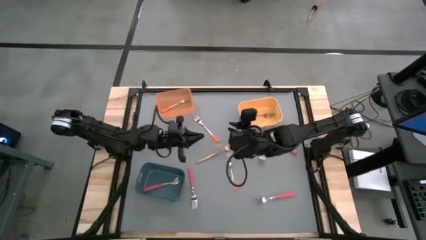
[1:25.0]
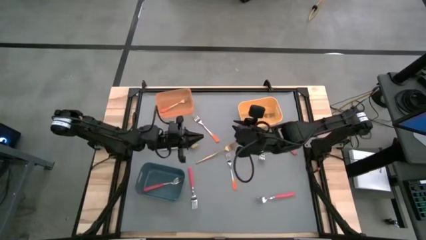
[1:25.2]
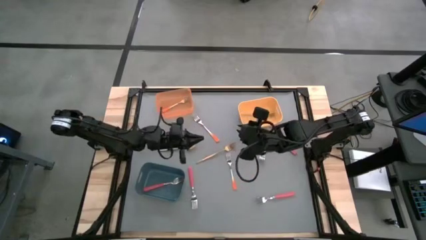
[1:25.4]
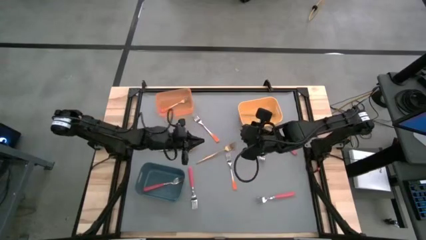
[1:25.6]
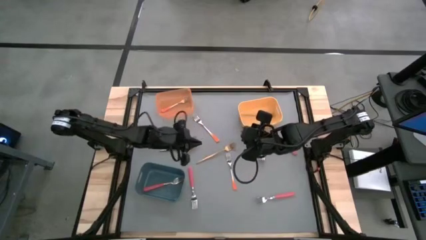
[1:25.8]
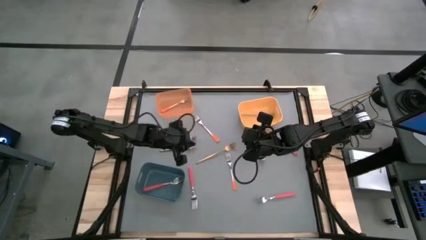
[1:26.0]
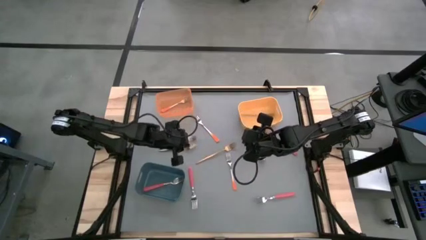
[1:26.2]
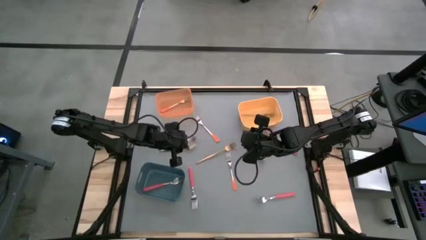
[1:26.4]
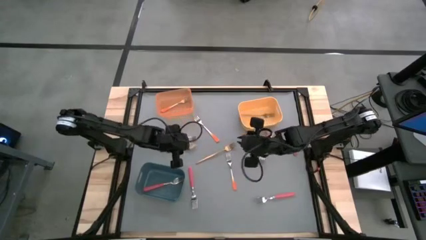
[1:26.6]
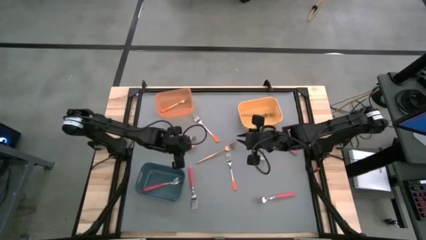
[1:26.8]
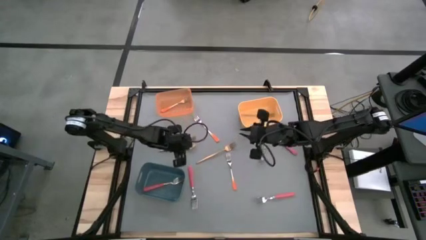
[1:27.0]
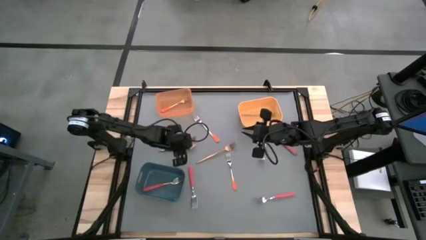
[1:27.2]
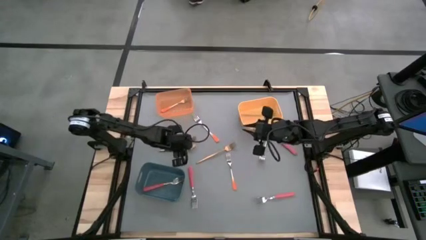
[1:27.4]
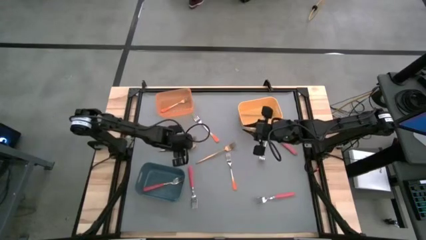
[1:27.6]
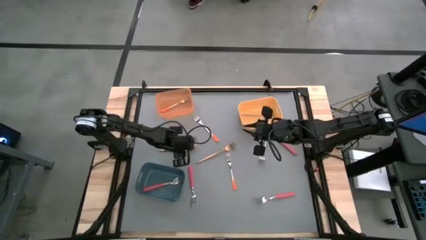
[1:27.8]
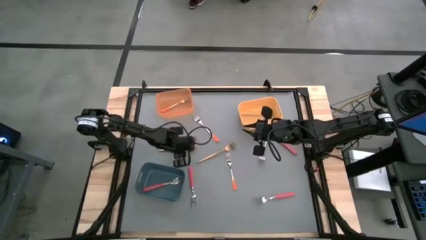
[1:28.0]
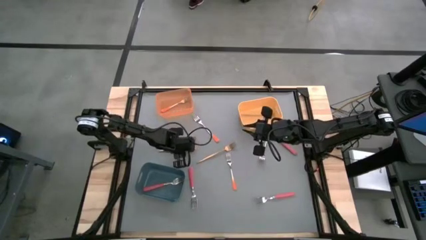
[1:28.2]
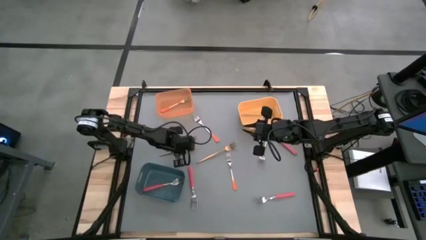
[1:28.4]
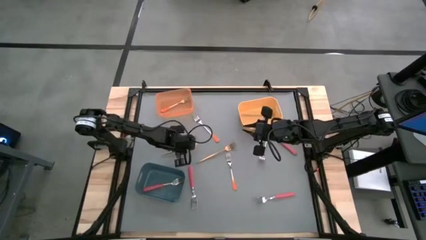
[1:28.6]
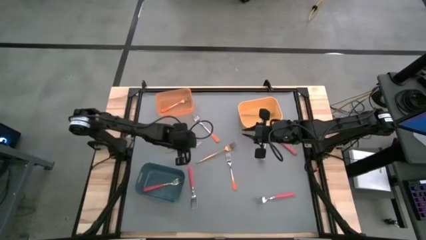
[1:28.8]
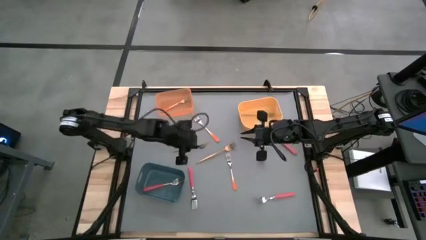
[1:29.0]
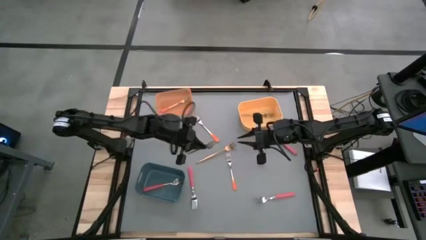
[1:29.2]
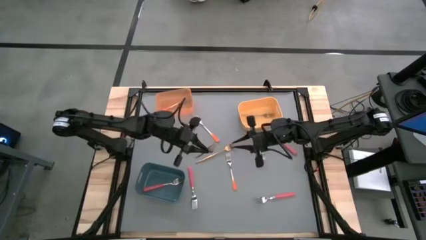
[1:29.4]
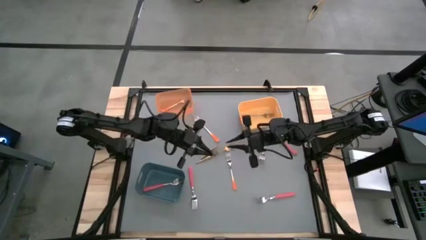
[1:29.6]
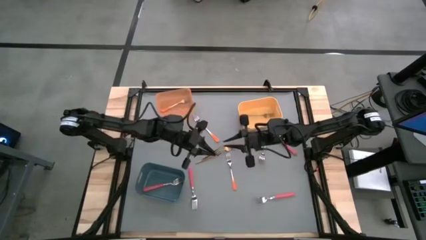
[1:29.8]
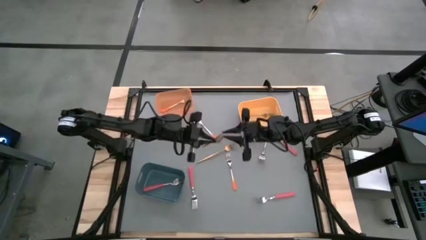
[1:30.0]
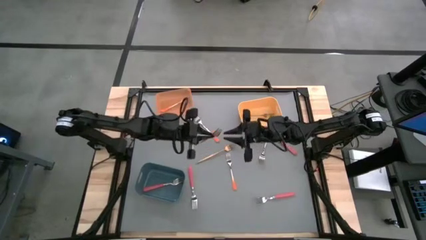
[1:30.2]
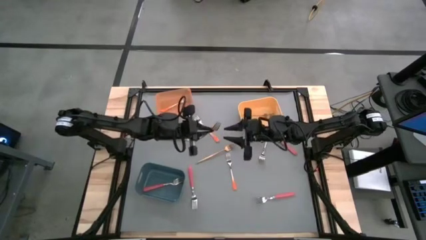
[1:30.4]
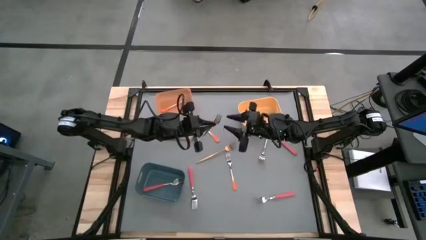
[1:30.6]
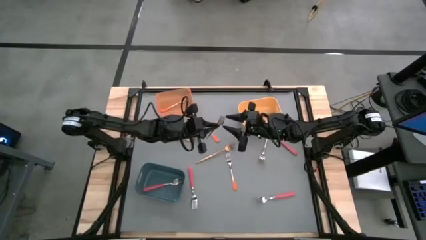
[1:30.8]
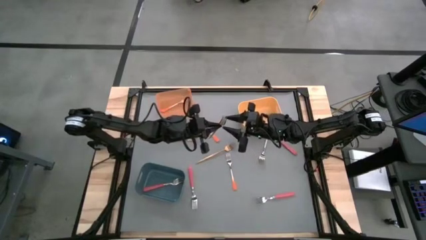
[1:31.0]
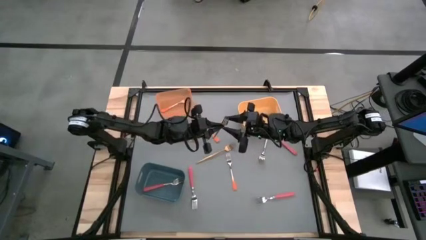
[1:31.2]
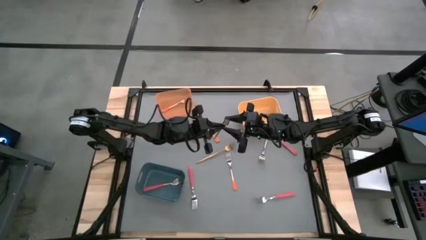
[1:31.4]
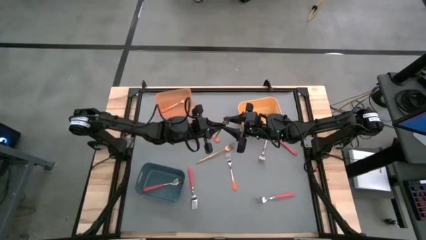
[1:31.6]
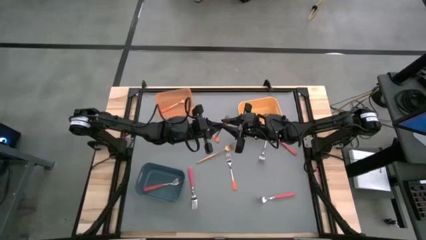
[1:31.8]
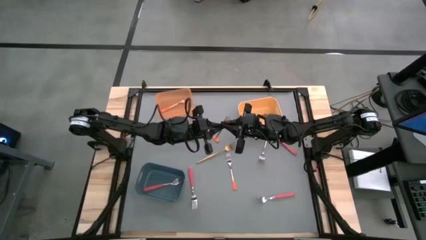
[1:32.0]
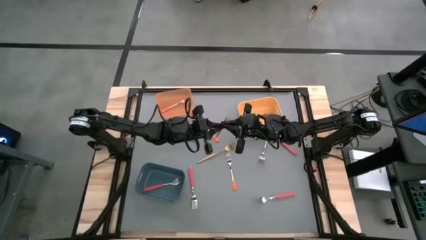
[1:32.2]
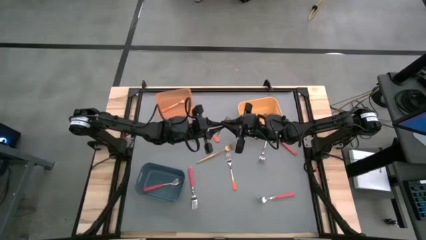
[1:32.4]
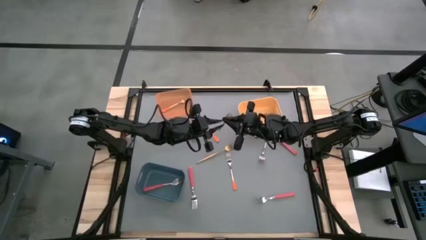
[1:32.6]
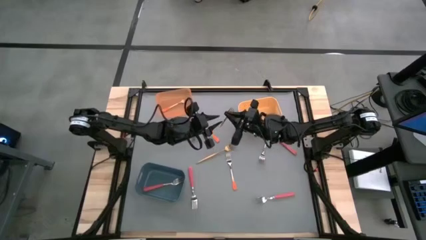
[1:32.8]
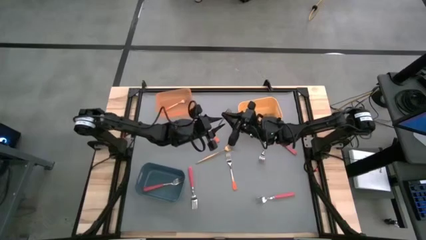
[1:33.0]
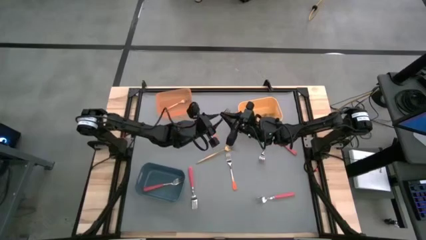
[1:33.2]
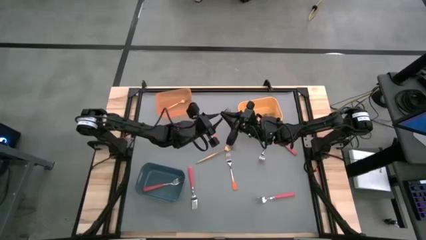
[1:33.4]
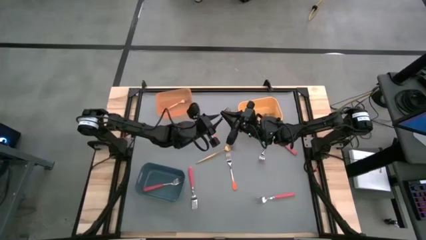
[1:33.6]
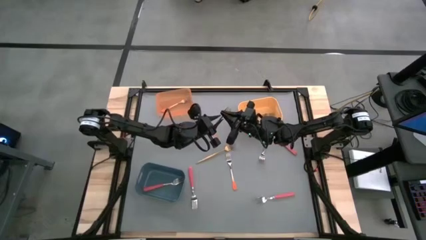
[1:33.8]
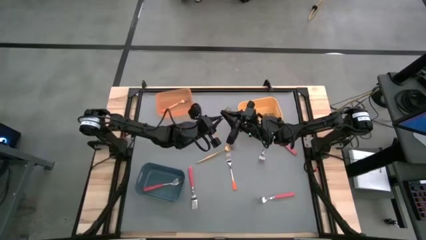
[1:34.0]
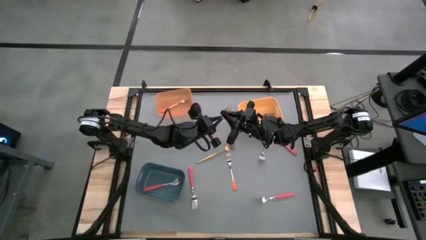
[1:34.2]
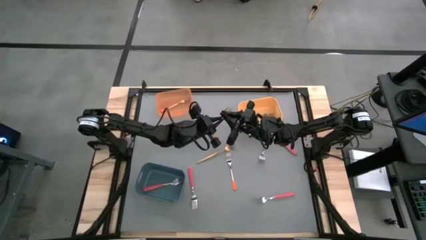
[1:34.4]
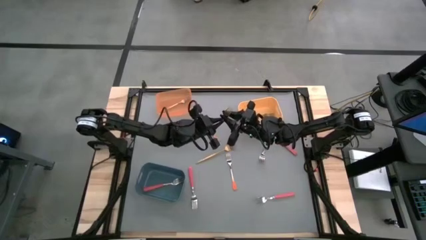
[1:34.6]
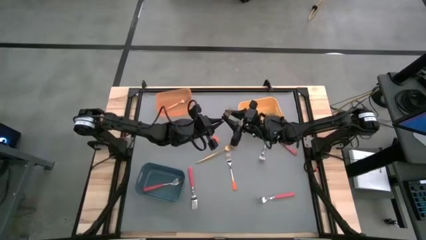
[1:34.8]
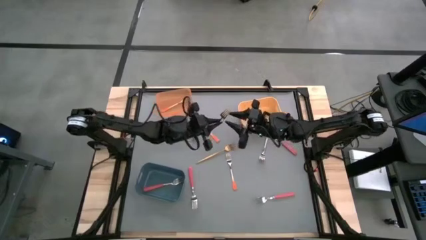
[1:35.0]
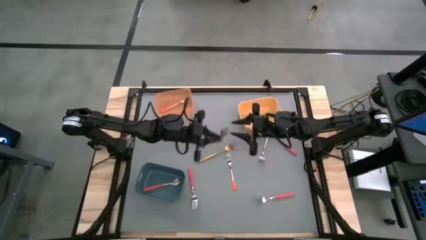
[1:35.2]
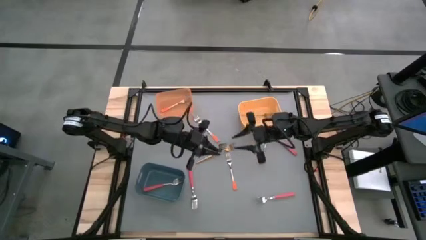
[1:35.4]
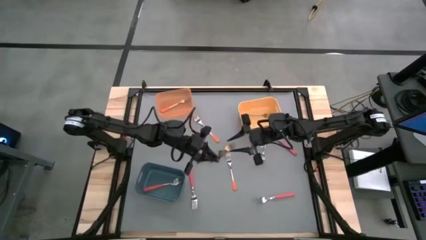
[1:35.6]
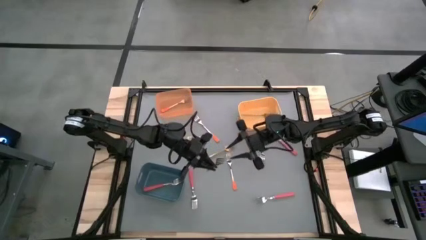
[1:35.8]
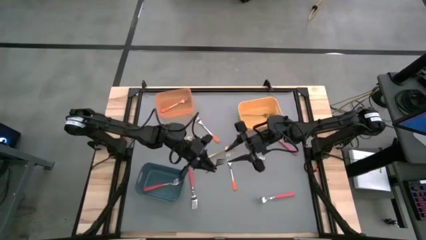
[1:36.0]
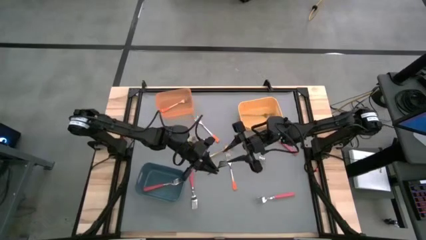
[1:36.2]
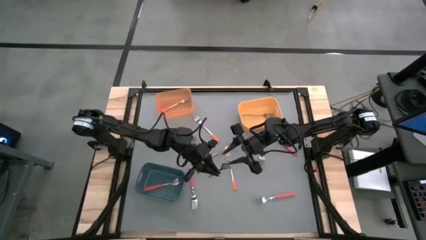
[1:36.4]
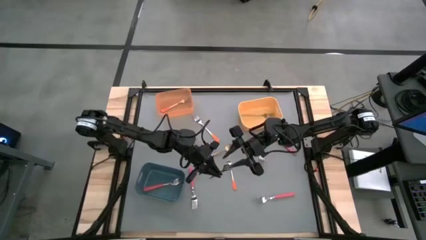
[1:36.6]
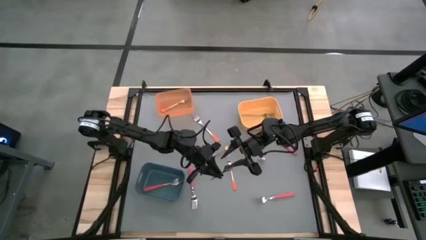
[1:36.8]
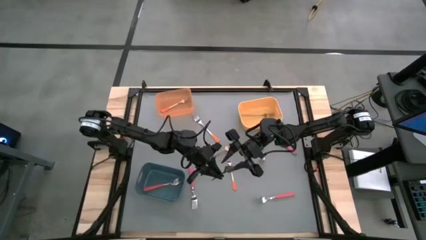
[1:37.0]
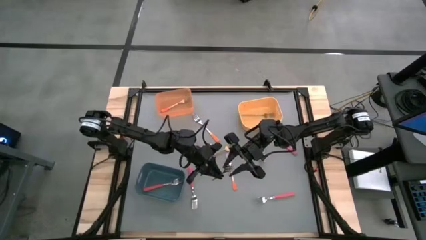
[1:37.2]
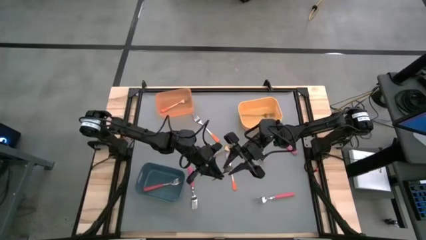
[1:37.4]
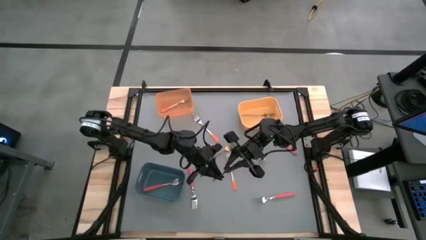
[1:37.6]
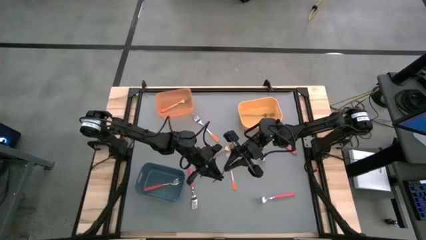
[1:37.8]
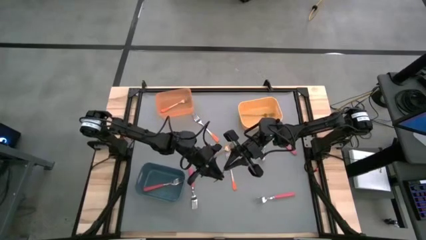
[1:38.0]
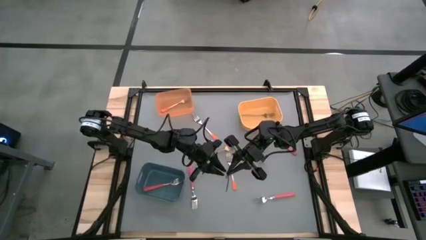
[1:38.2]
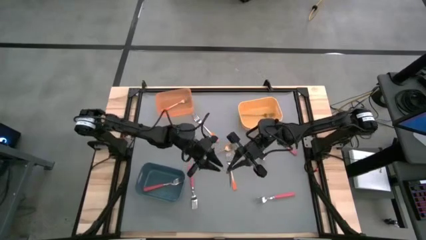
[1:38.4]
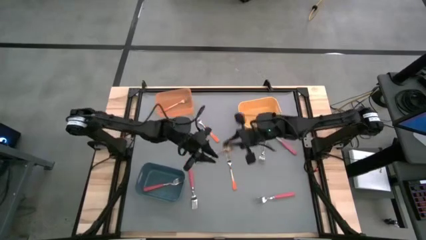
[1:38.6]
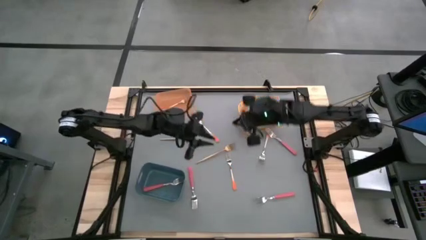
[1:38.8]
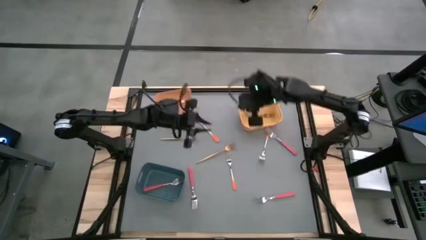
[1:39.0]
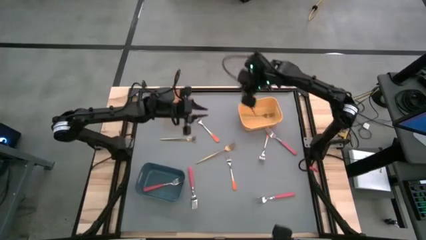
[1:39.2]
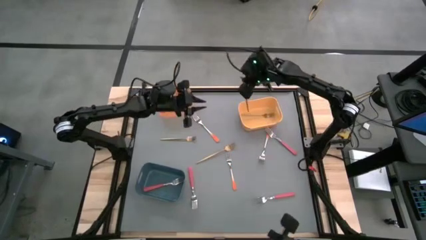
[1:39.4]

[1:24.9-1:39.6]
Task: Sort silverware by color (type)
Put the gold fork into the yellow bin
